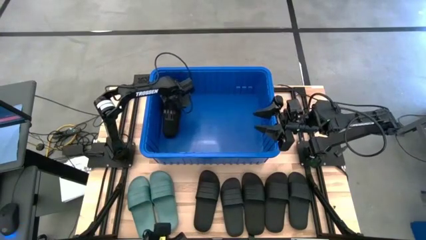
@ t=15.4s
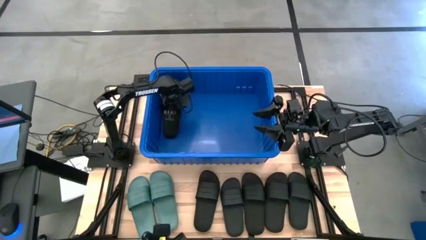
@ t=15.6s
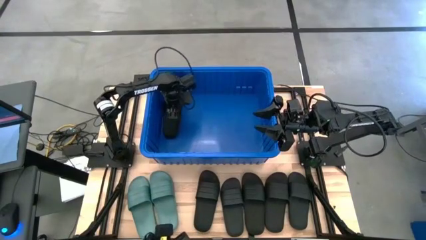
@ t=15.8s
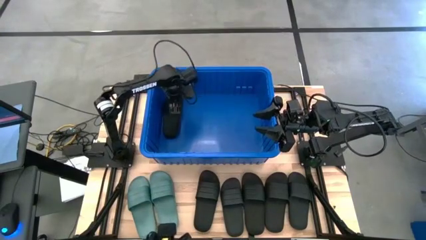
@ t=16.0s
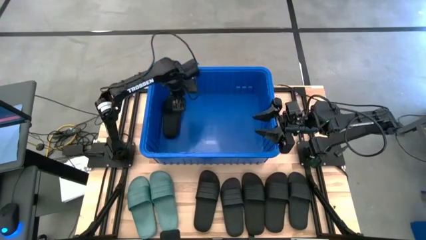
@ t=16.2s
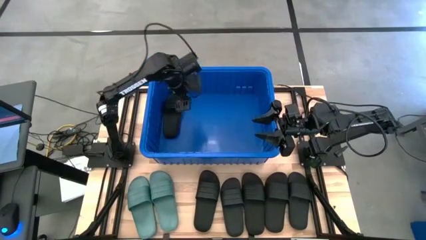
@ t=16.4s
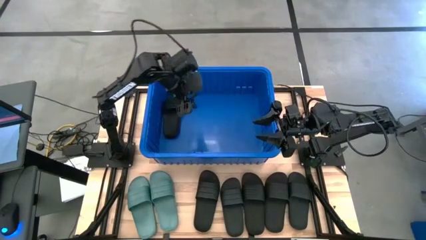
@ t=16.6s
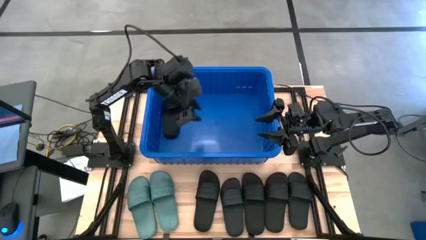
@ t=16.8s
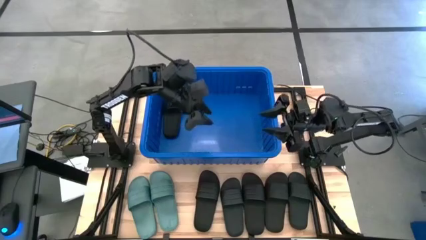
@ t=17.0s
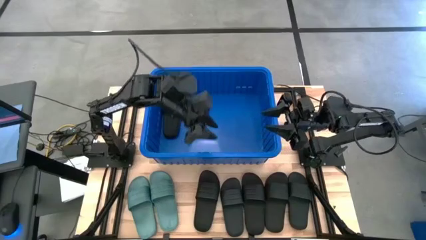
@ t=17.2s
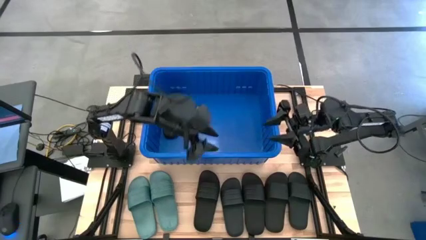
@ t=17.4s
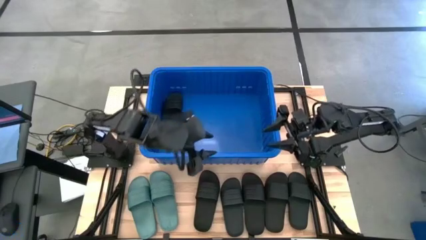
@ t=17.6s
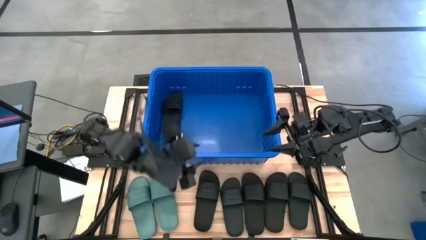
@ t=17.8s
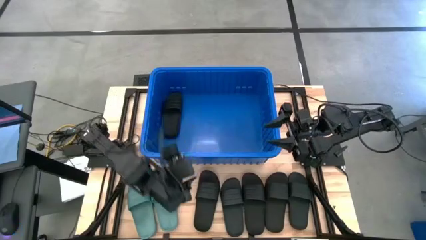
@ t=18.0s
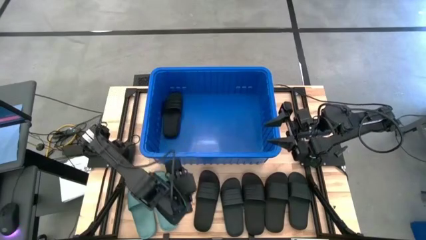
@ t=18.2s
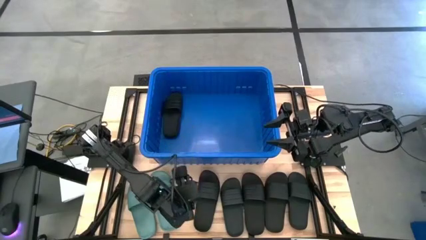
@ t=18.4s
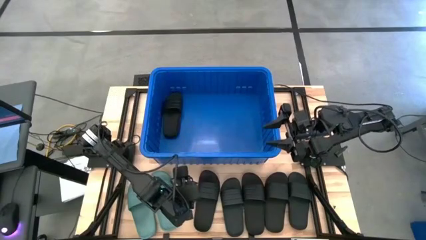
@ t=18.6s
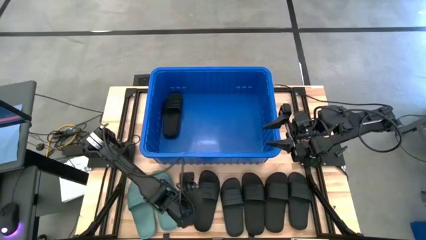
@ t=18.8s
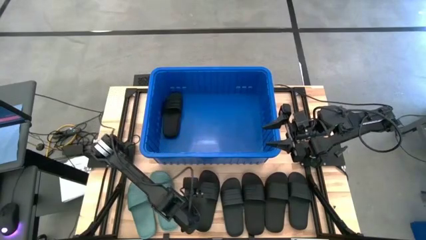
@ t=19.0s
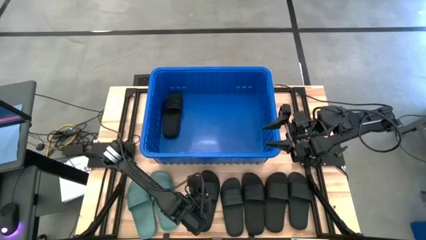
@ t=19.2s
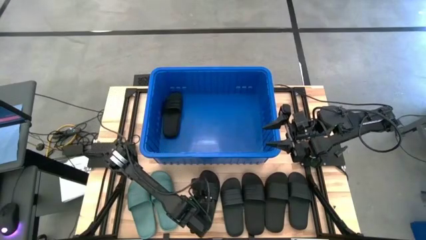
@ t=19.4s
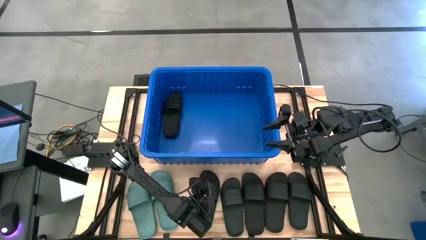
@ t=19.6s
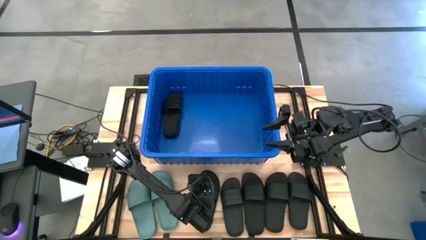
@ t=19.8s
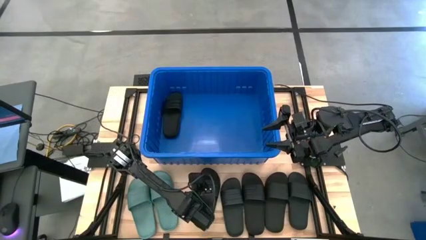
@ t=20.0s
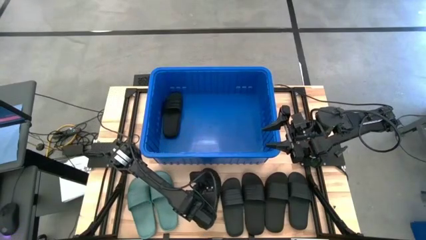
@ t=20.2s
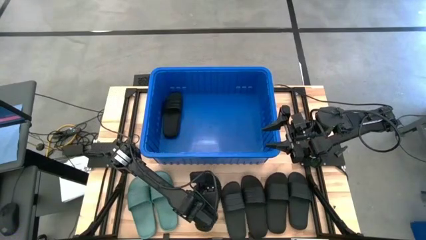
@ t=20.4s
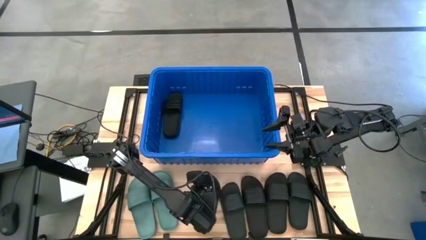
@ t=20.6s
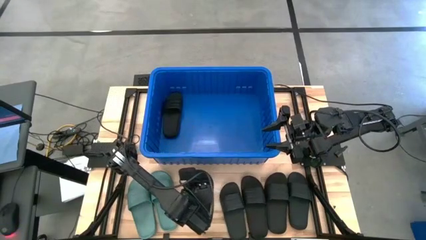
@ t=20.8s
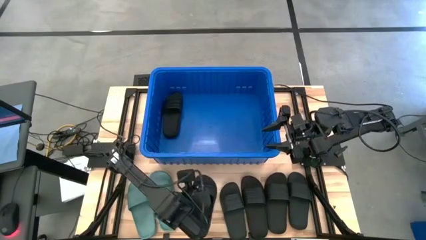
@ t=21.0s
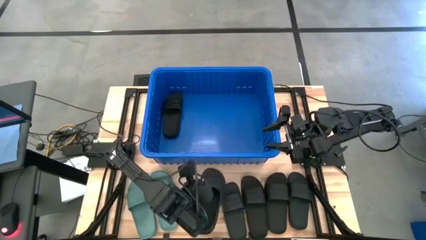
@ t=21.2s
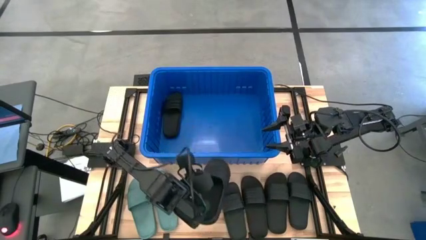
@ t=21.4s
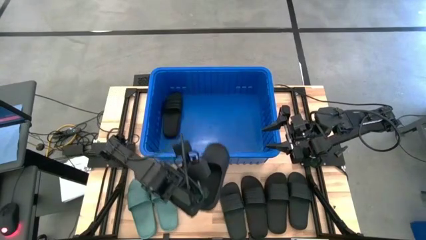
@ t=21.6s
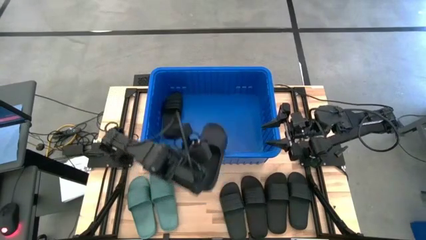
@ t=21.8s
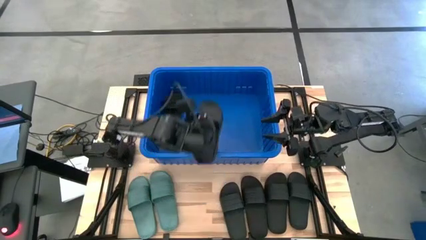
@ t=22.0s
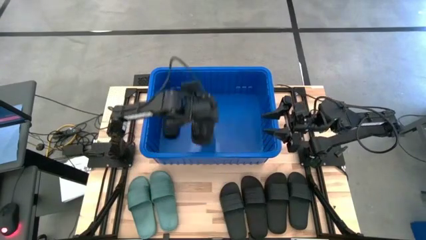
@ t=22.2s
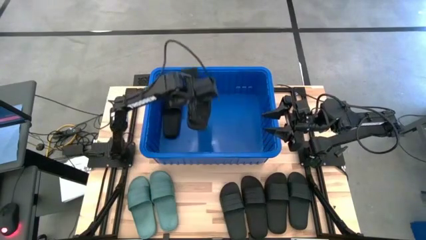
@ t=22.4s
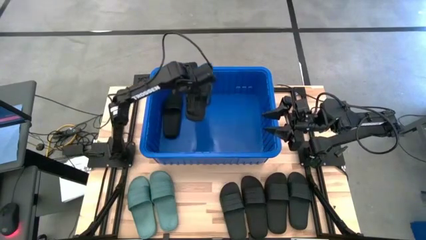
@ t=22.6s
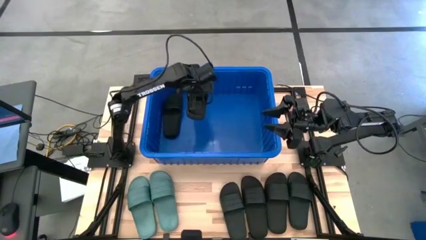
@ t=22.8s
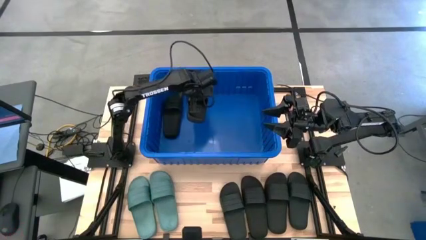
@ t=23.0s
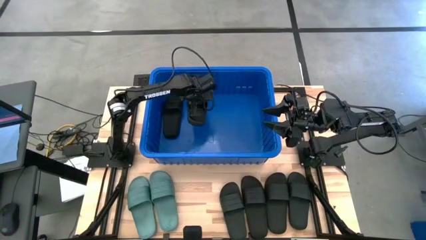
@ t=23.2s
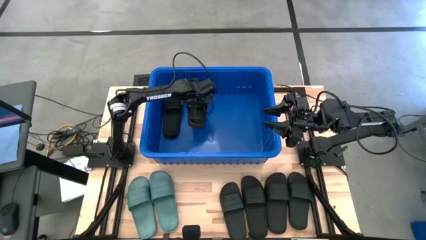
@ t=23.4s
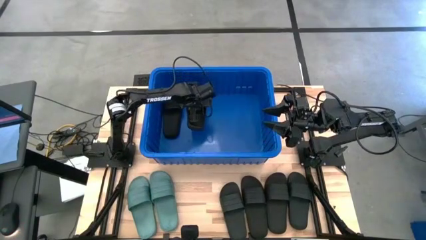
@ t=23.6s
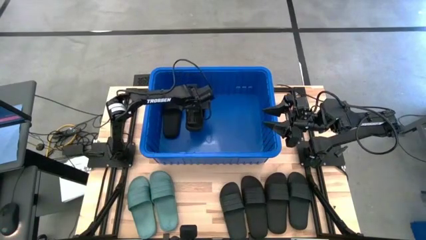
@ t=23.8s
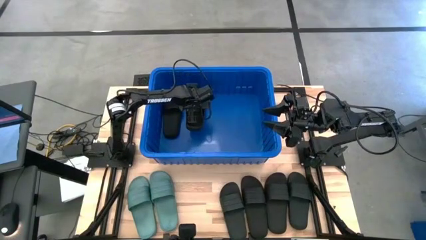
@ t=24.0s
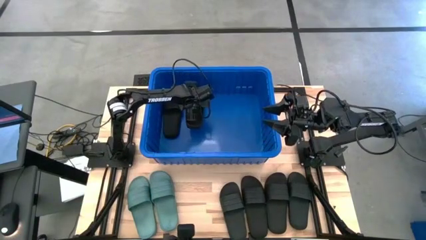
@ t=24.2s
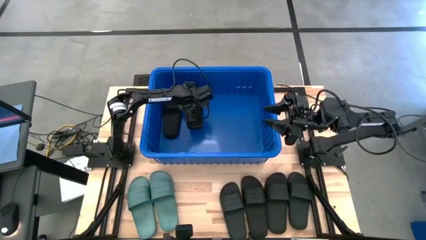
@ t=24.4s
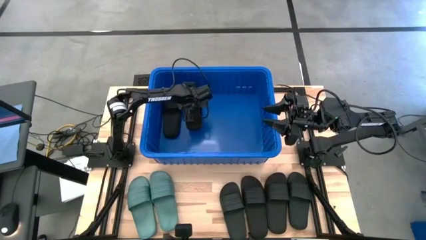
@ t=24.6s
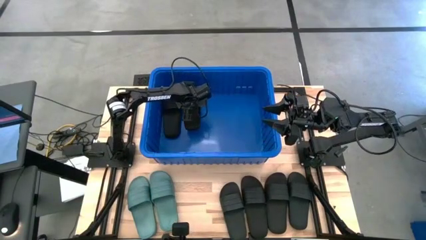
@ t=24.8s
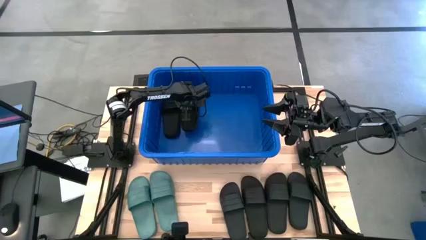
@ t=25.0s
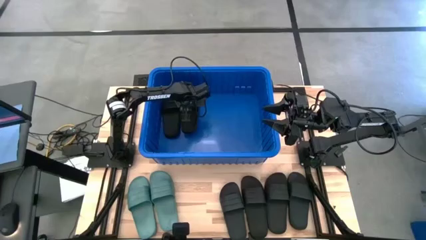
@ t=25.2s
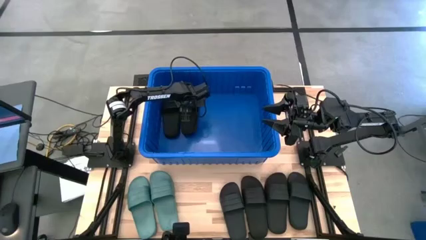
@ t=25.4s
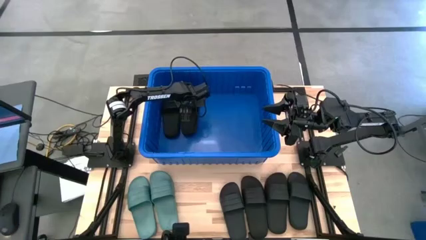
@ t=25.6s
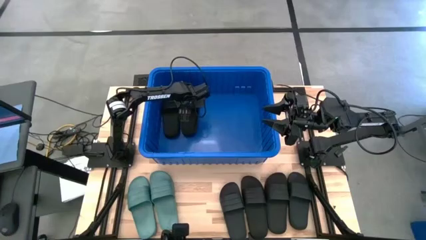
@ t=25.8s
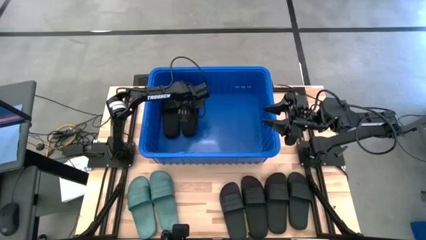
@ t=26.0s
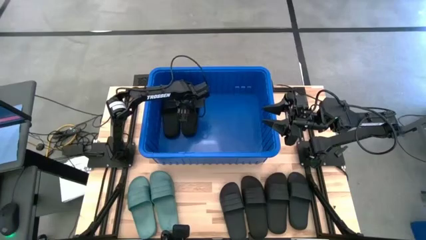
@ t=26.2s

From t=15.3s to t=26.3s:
Task: Pick and place slides into bin
Put the black slide into the blue bin

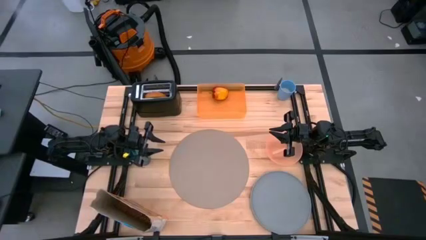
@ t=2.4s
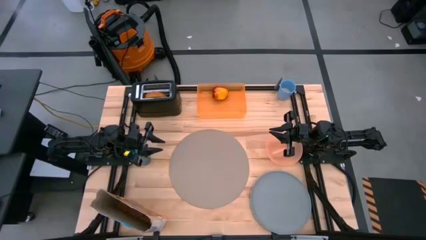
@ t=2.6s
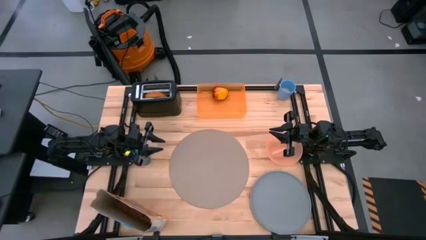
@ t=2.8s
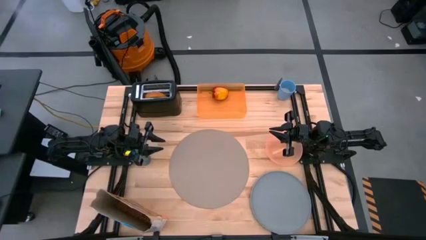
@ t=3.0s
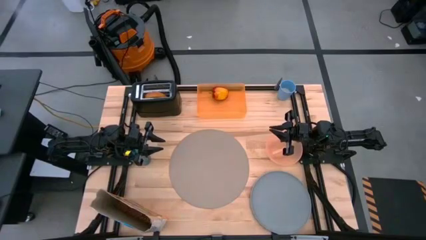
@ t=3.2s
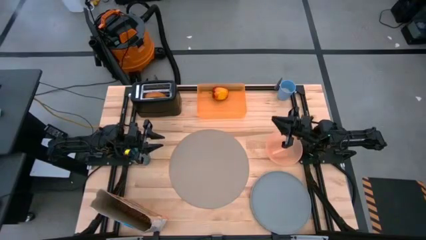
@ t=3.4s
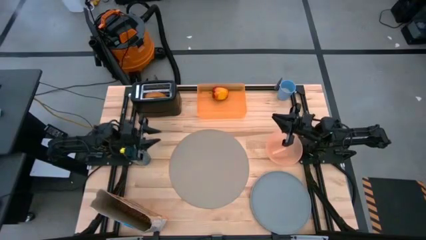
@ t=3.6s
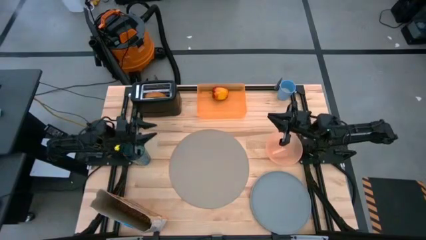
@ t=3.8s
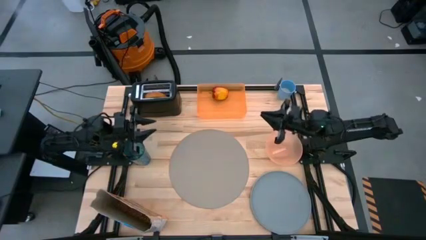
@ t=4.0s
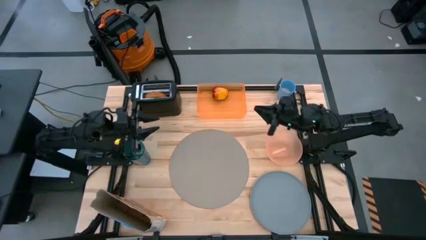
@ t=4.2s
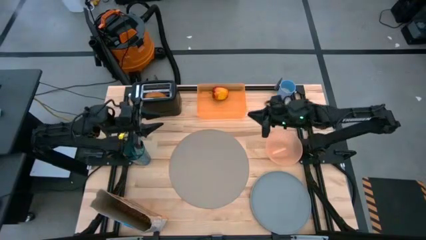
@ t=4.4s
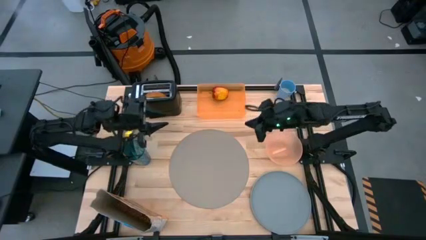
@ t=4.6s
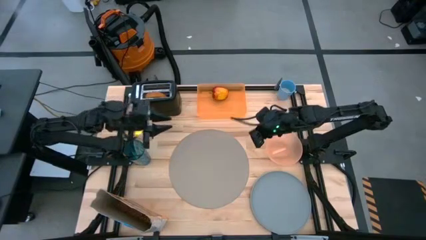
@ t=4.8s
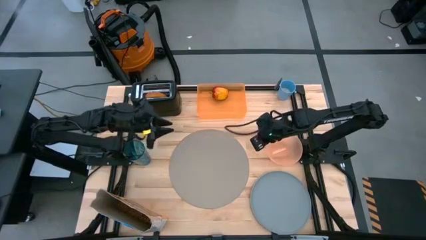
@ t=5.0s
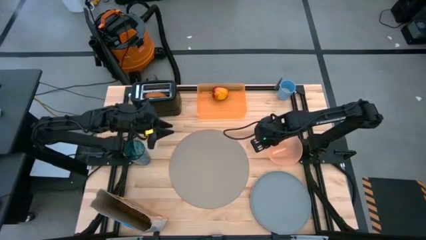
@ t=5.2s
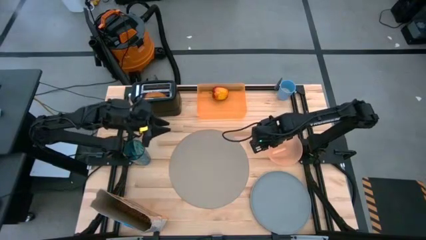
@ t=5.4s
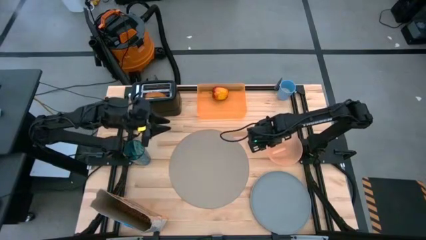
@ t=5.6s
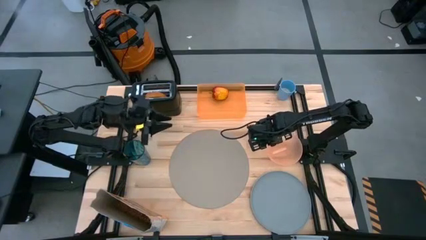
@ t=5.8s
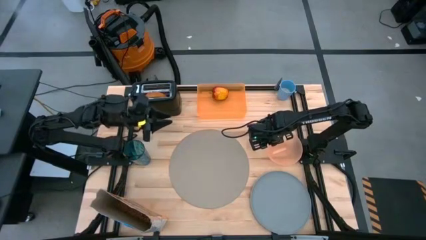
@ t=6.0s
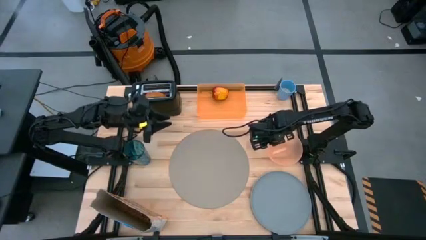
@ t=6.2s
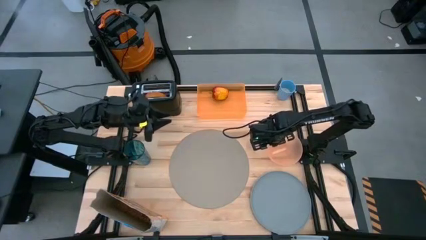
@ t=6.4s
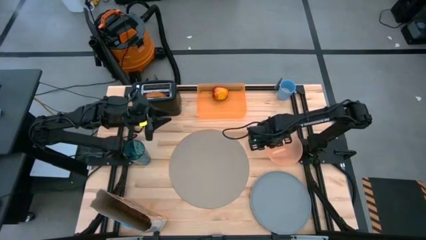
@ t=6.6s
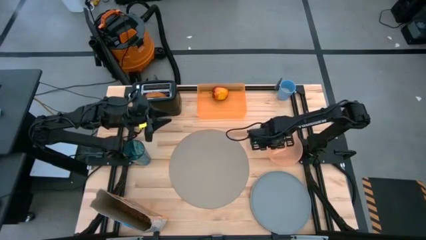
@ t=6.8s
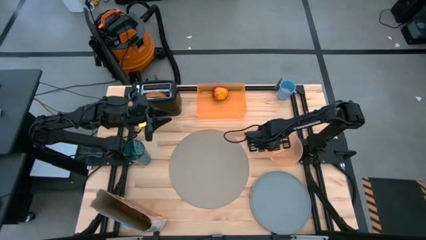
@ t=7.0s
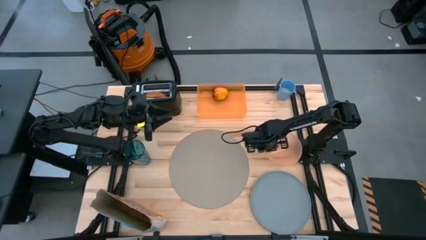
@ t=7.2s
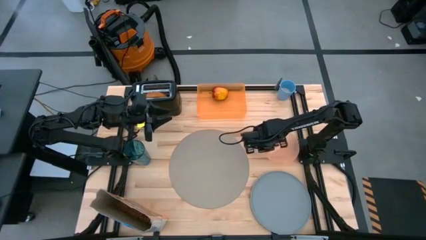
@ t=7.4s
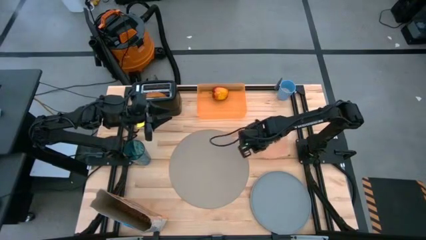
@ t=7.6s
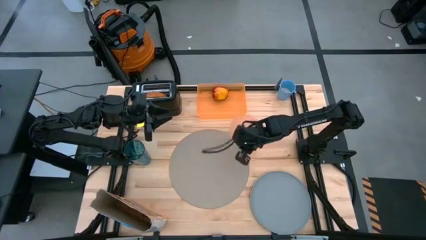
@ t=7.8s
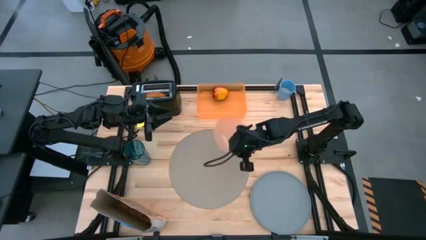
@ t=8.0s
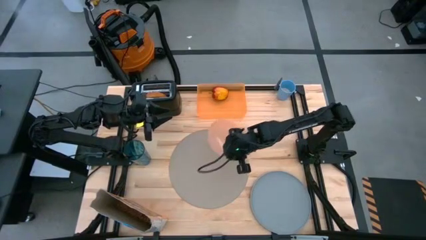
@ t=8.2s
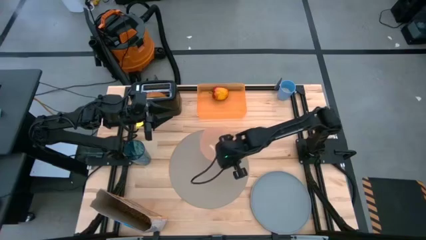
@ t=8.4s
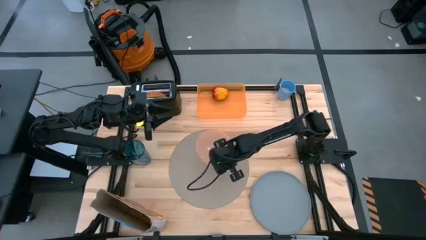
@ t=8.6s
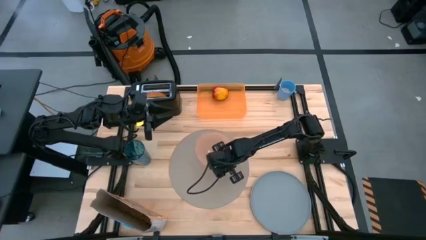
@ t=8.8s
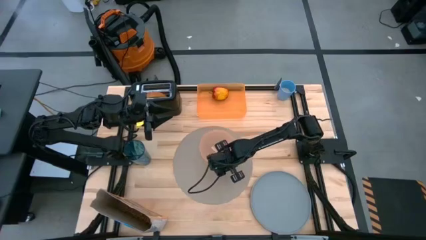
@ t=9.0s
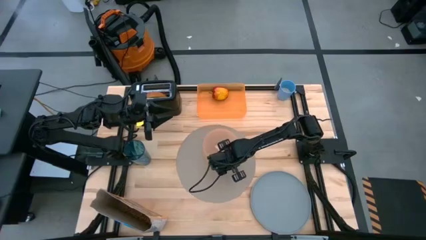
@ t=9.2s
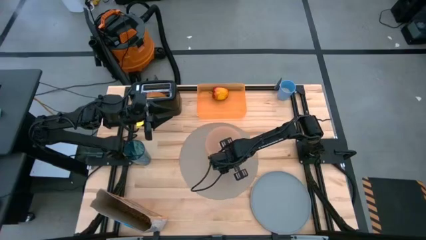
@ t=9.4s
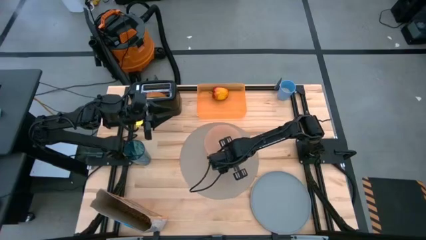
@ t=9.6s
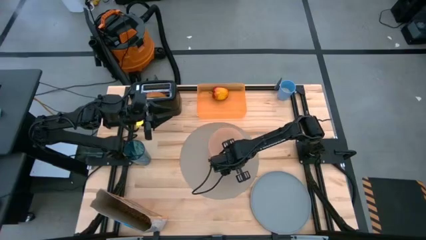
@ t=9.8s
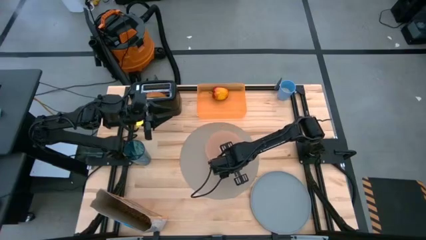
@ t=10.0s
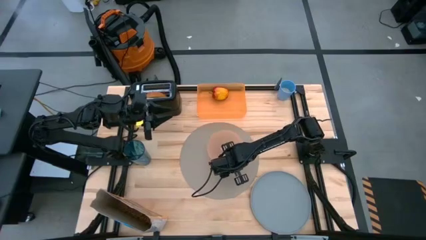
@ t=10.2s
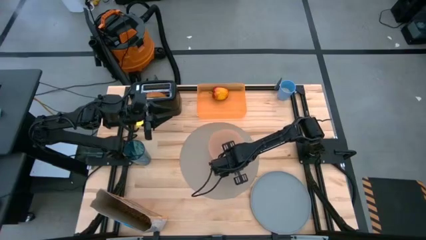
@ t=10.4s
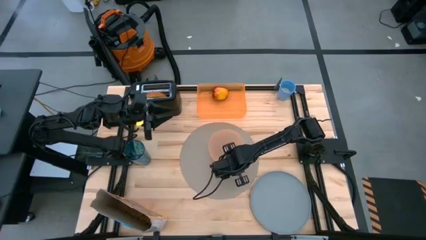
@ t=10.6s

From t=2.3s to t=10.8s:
Task: Arrange a breakfast setting
Put the pink bowl on the gray placemat
